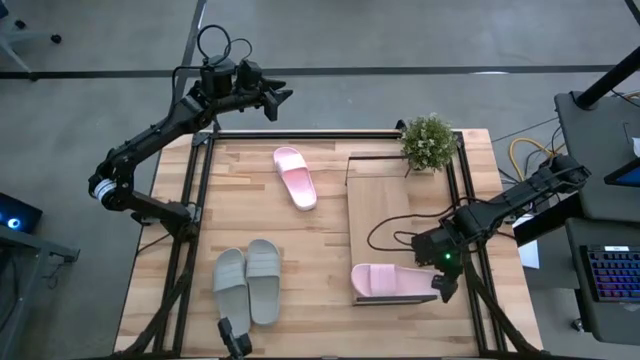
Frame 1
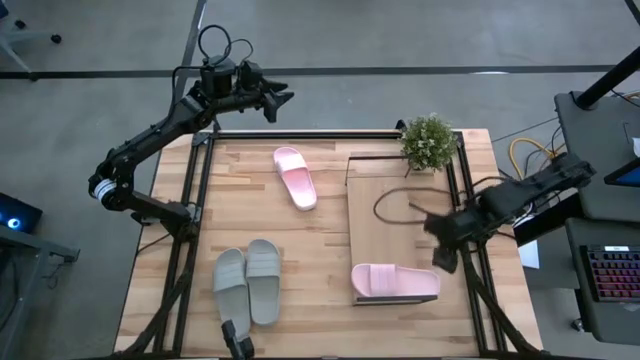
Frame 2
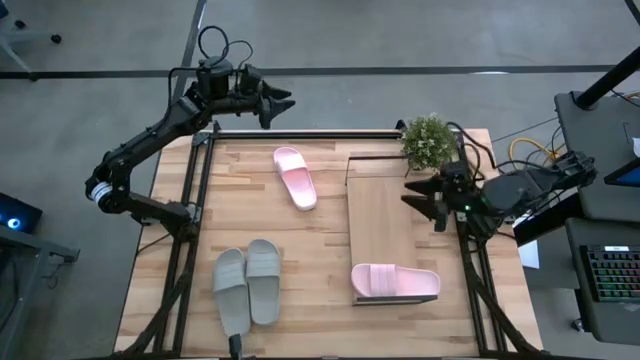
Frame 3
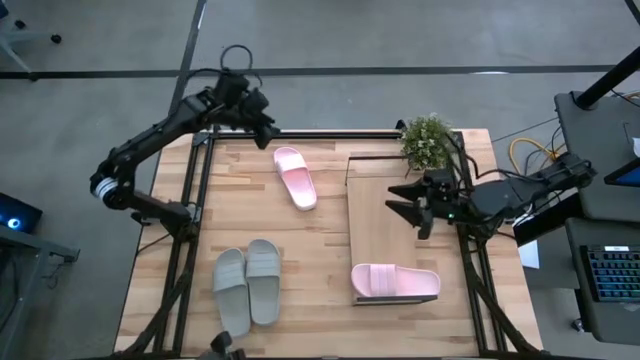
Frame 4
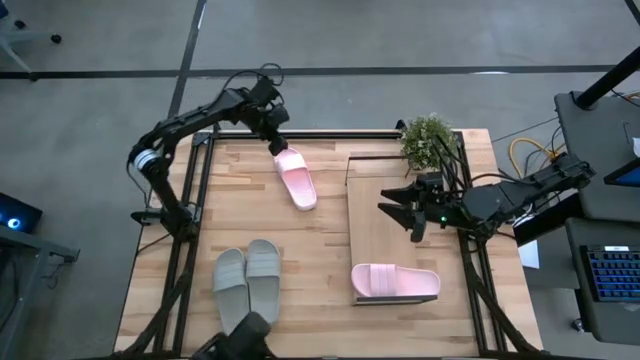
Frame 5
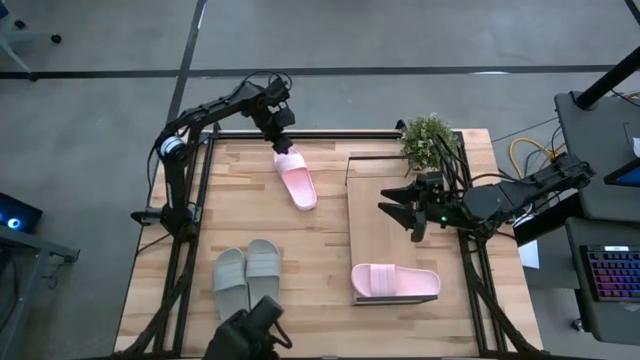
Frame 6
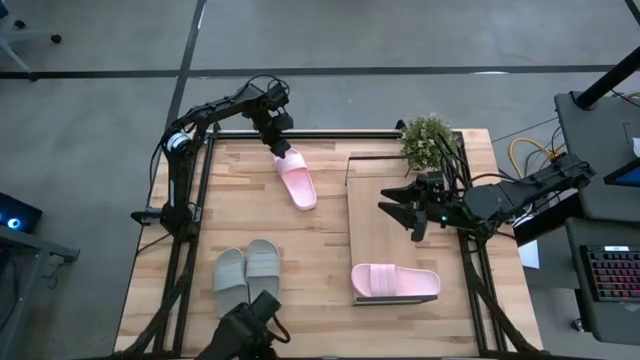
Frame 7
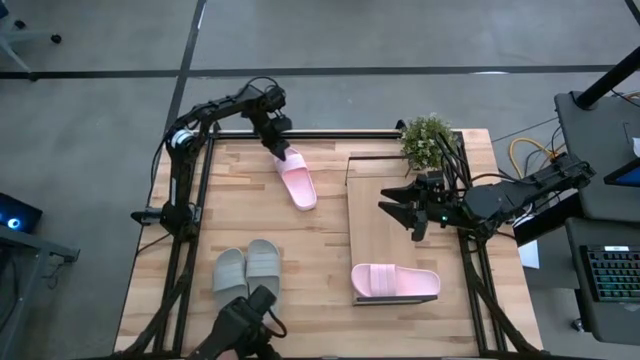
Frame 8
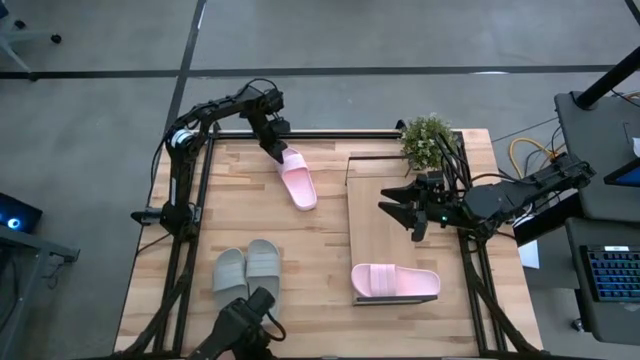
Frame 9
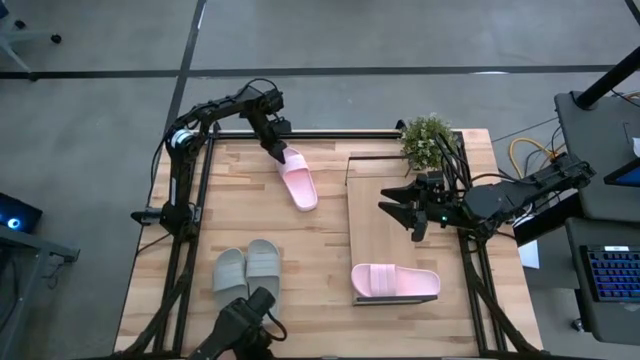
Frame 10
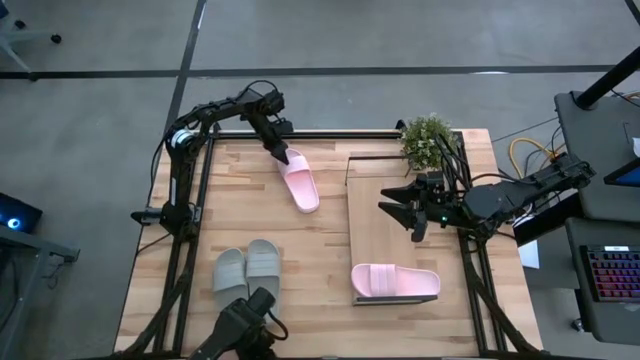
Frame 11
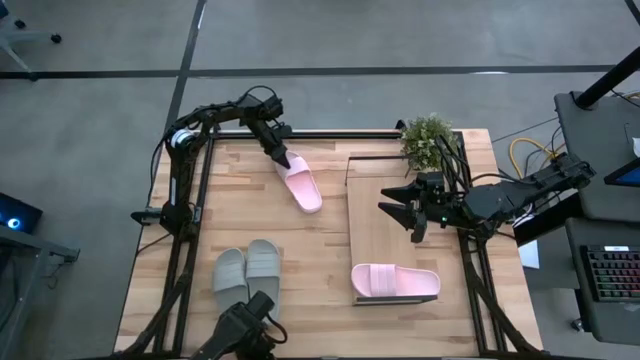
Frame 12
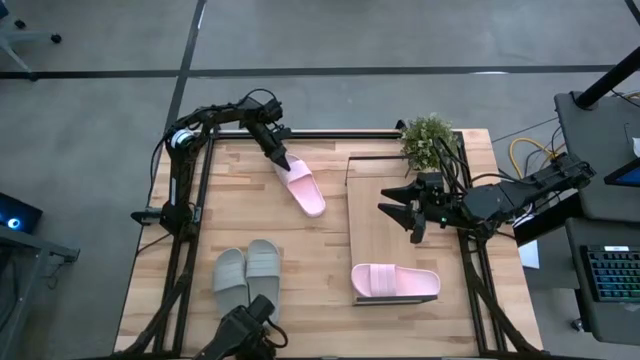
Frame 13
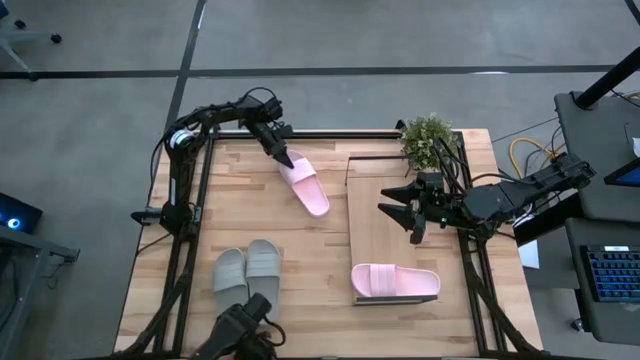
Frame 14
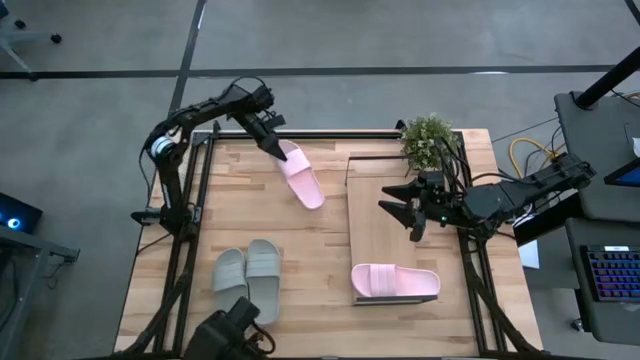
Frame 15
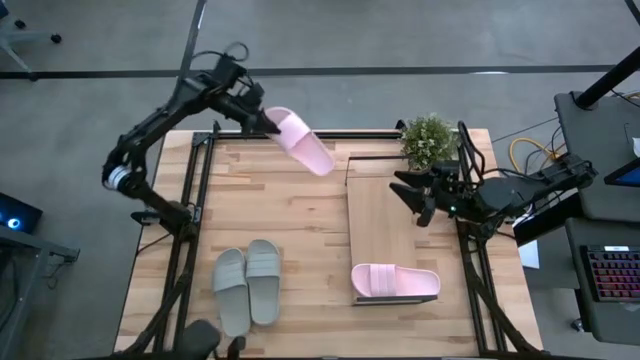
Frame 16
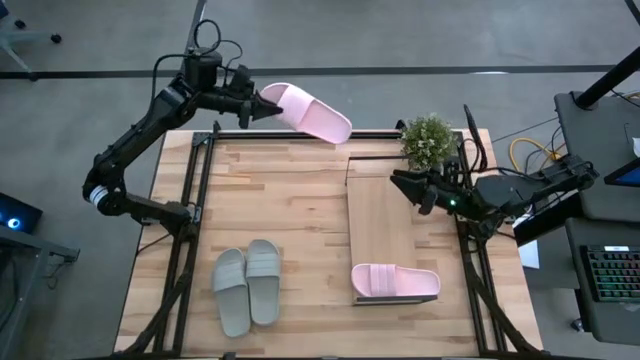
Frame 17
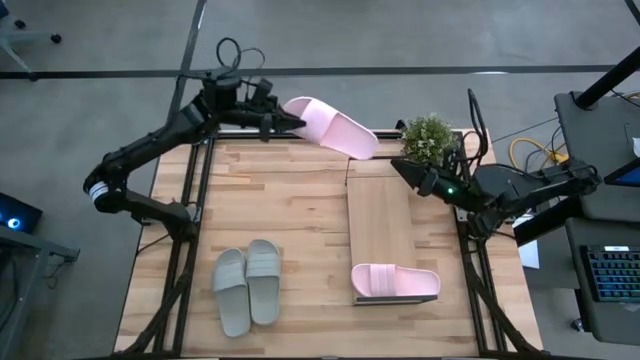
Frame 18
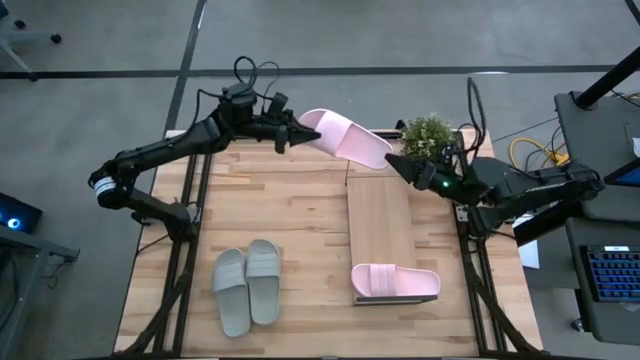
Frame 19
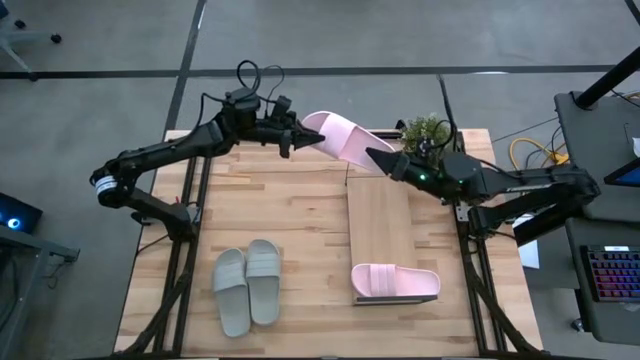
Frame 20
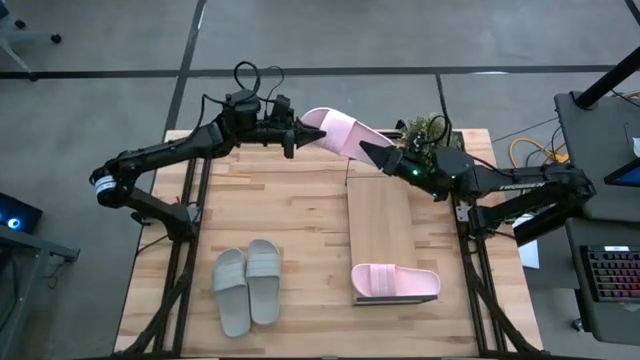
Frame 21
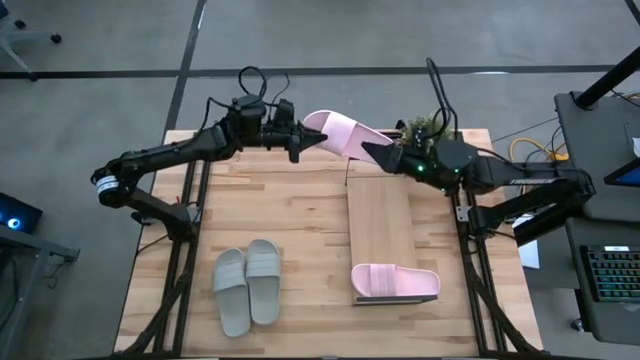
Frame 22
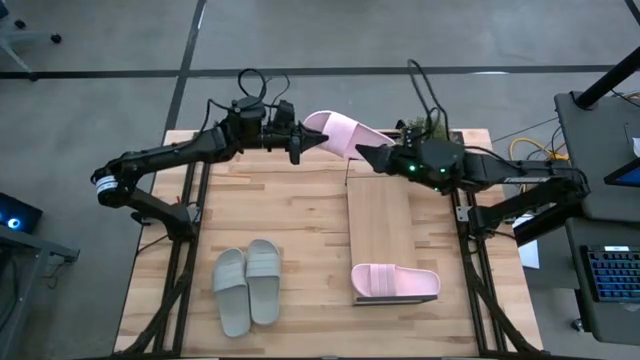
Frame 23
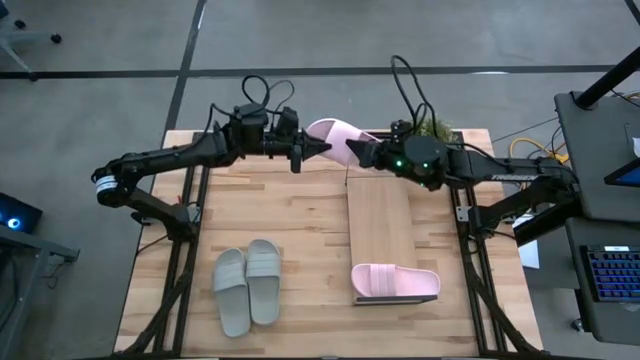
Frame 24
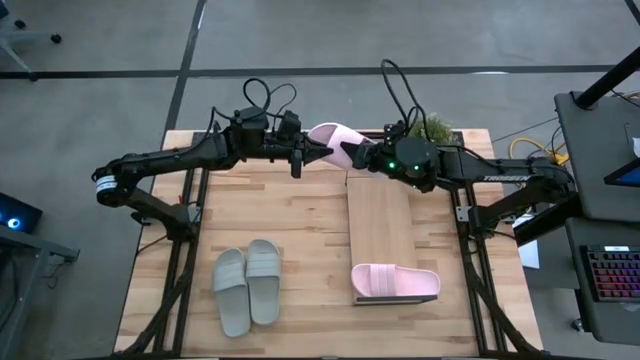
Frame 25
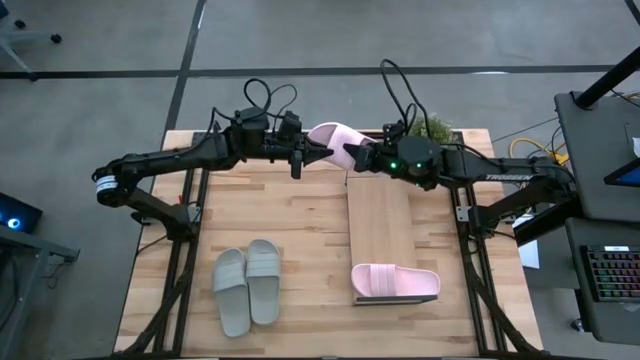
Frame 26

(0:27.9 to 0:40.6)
Task: Pick and place slides into the shelf
Put the pink slide on the shelf

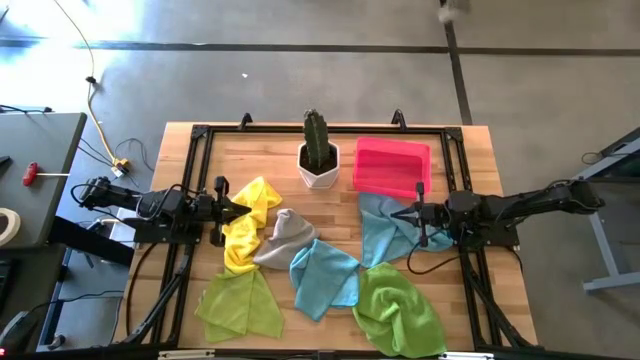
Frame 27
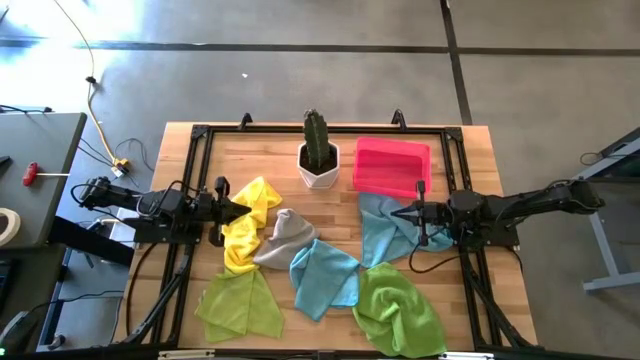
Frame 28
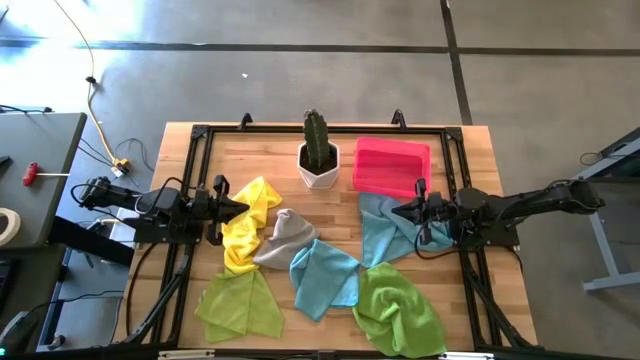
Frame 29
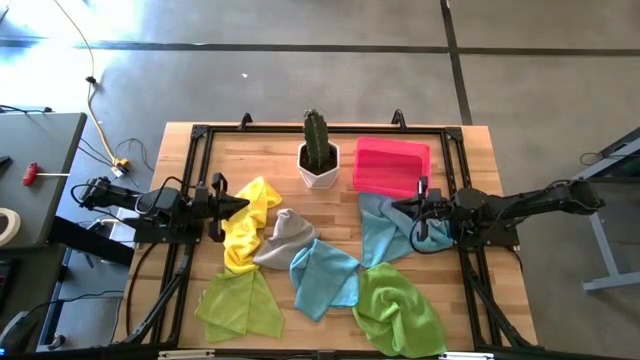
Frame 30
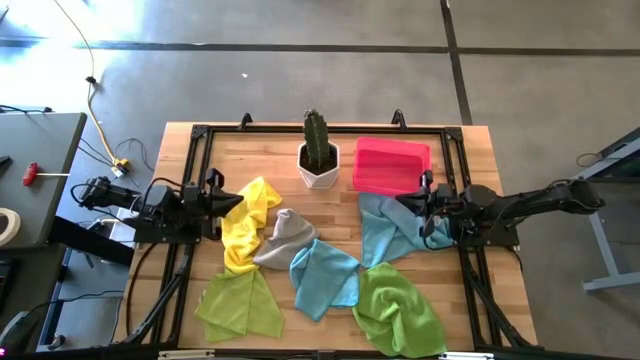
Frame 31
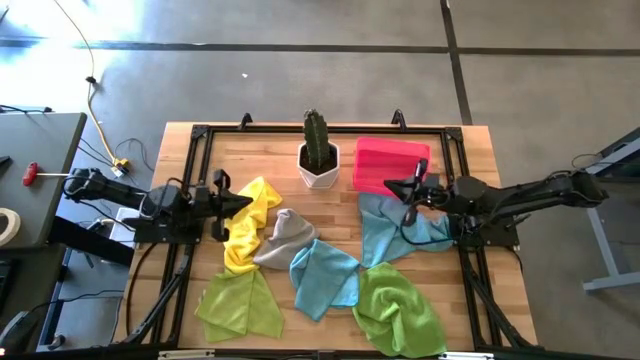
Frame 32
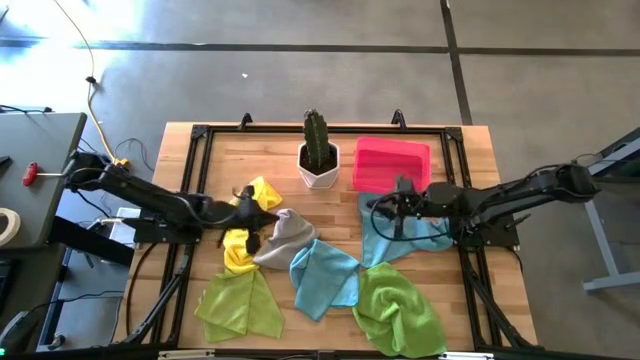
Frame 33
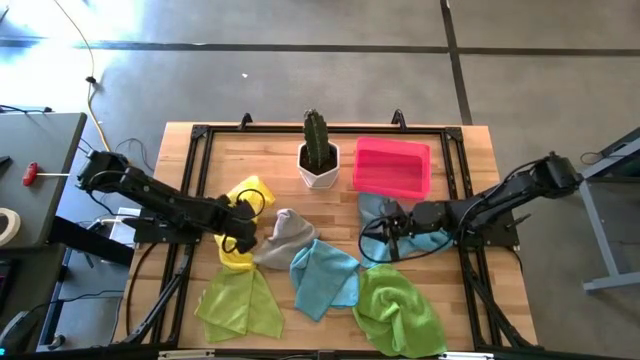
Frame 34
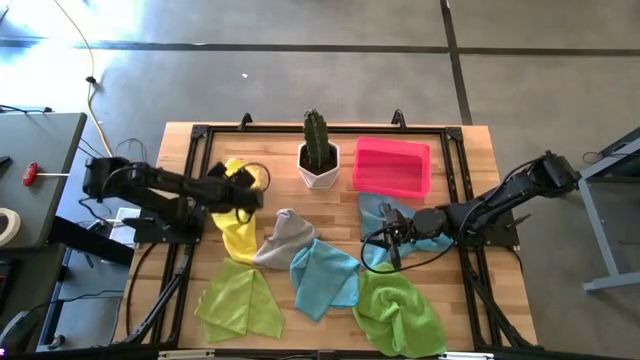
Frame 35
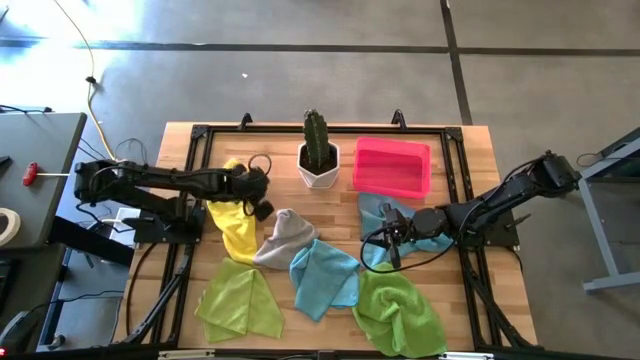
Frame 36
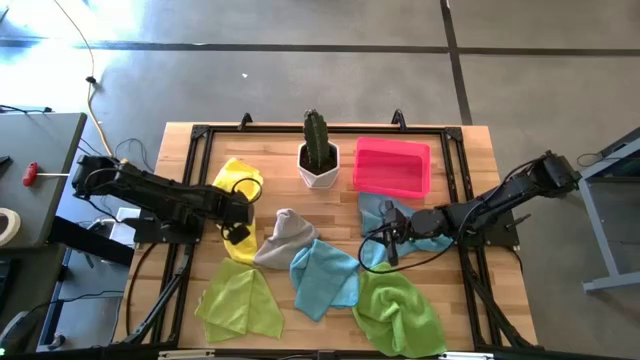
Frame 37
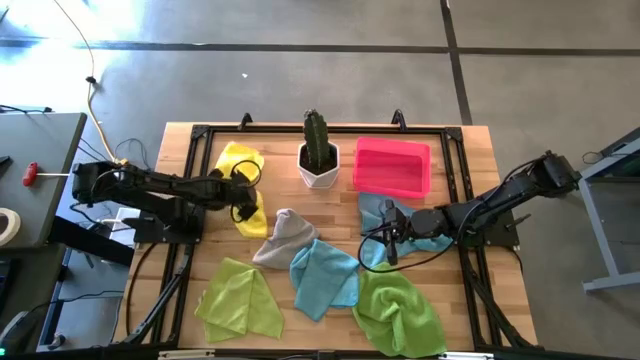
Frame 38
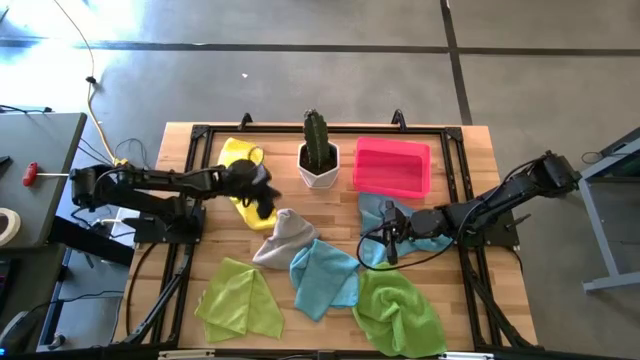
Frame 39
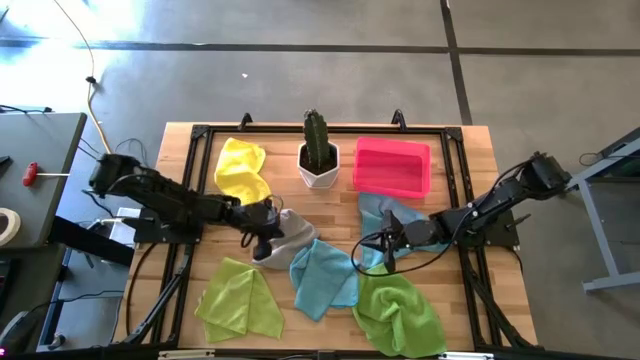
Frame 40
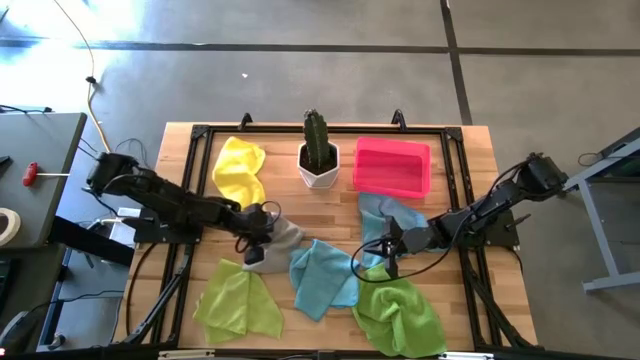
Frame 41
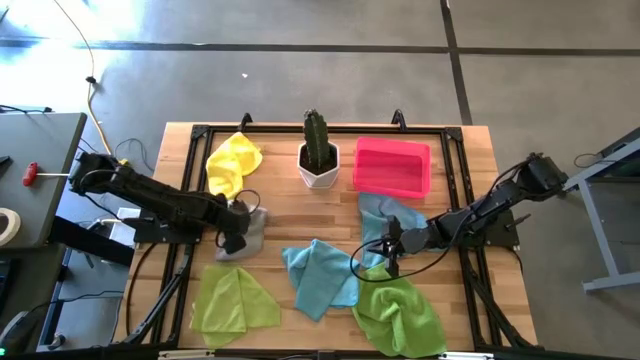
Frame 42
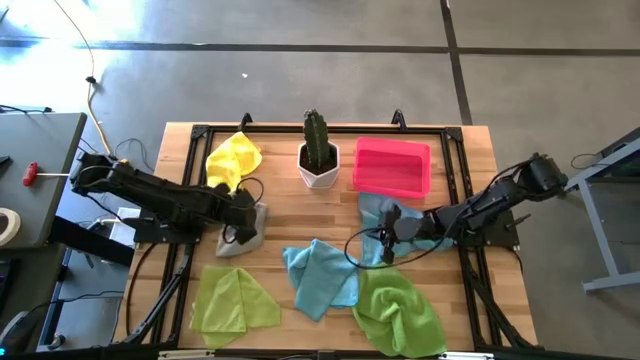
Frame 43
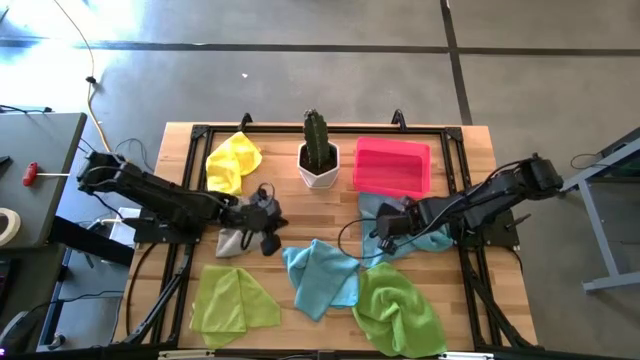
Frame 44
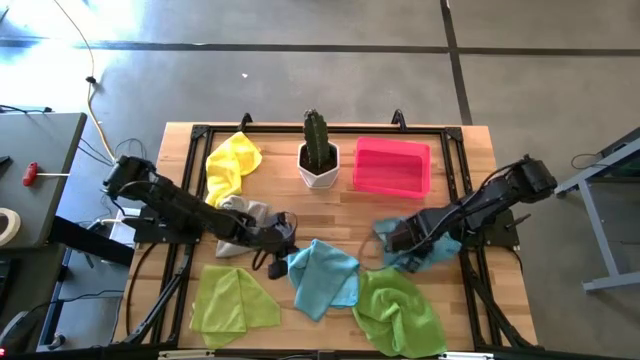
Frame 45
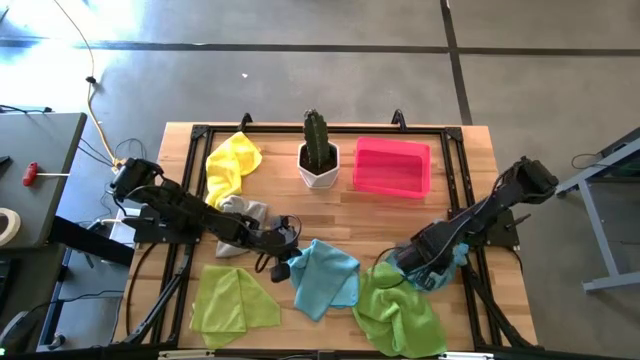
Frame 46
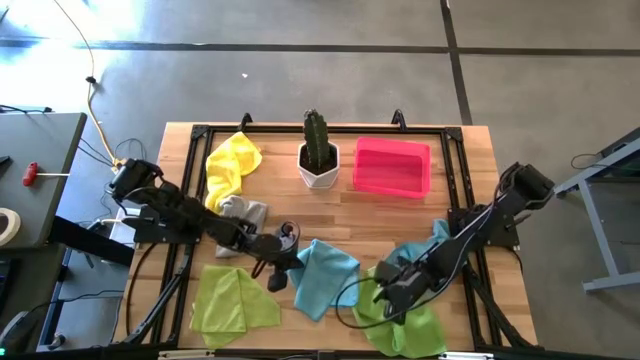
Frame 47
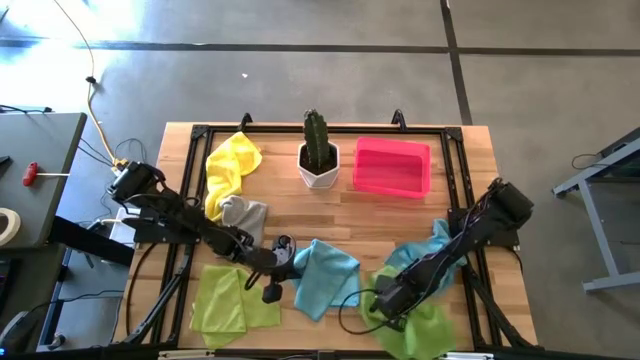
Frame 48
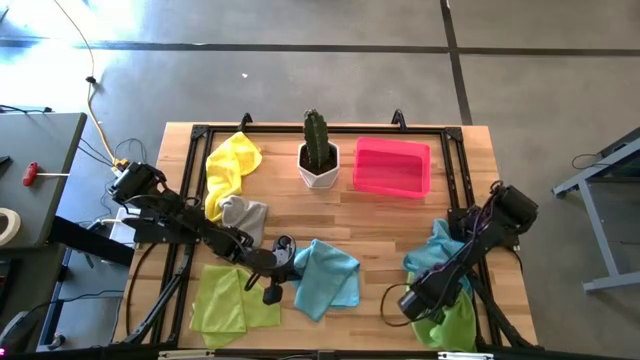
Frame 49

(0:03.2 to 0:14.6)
Task: Fold microfiber towels
Prepare the towels
